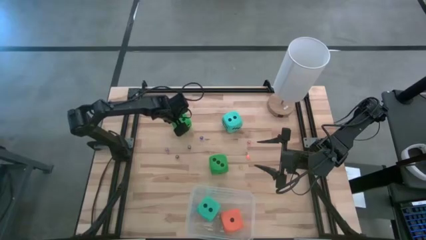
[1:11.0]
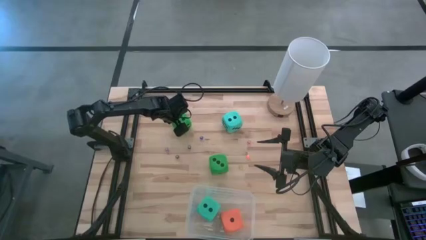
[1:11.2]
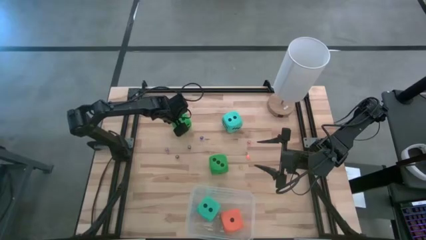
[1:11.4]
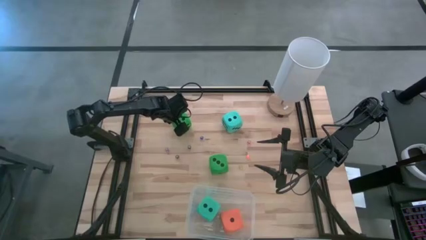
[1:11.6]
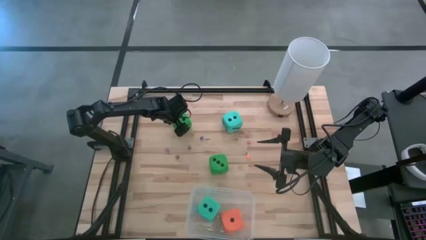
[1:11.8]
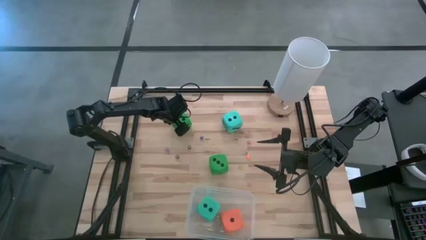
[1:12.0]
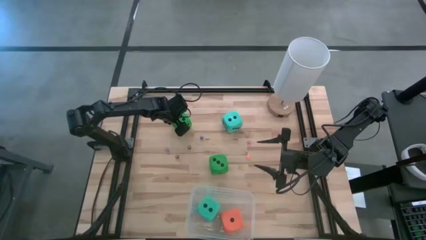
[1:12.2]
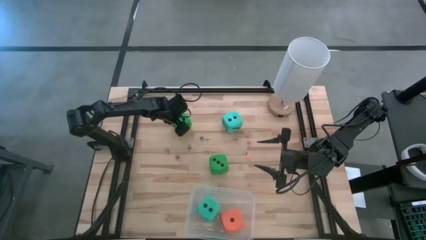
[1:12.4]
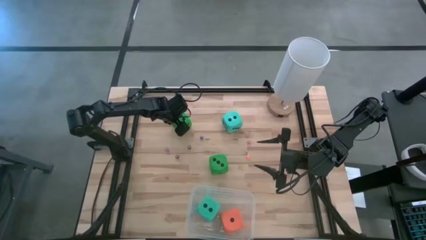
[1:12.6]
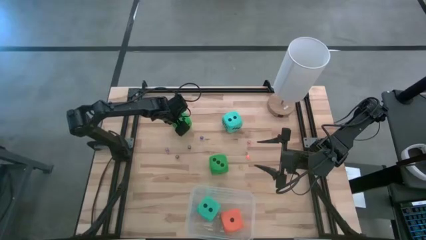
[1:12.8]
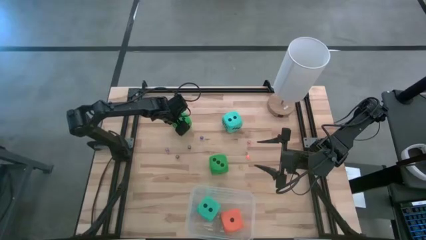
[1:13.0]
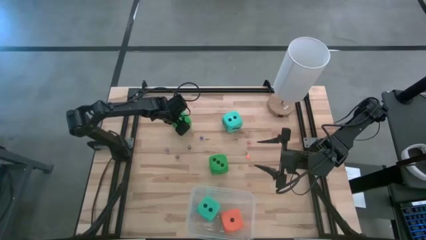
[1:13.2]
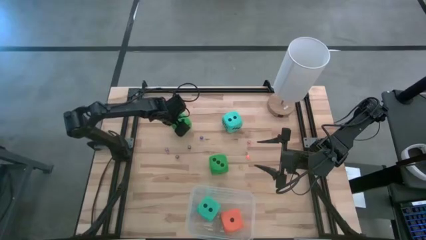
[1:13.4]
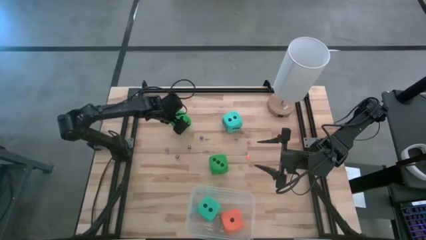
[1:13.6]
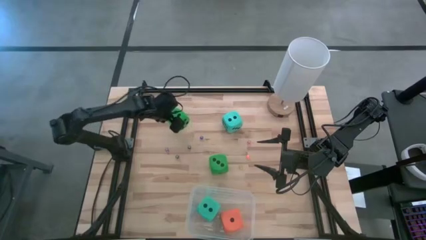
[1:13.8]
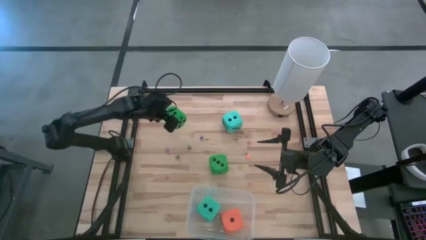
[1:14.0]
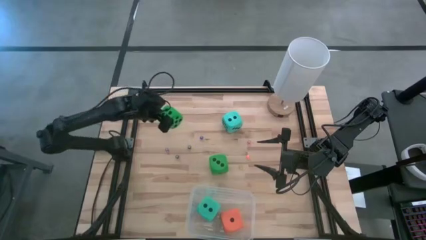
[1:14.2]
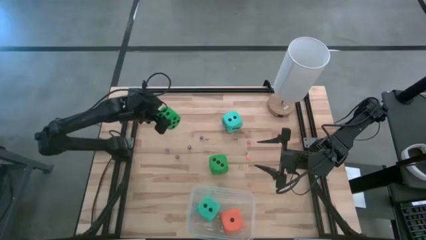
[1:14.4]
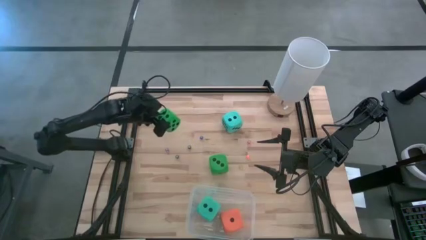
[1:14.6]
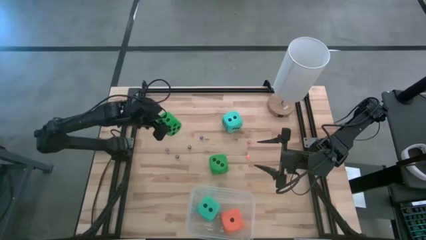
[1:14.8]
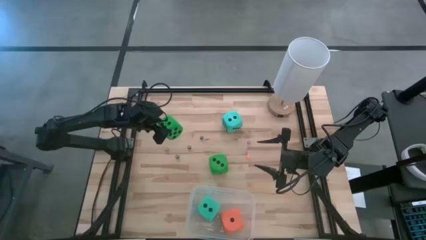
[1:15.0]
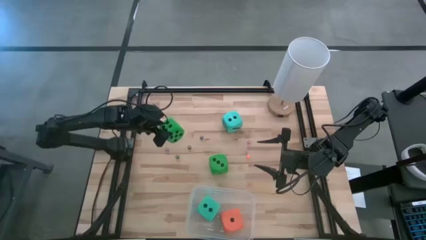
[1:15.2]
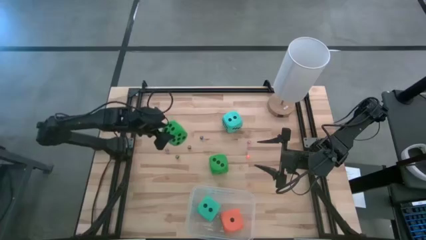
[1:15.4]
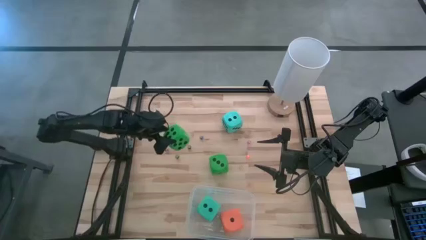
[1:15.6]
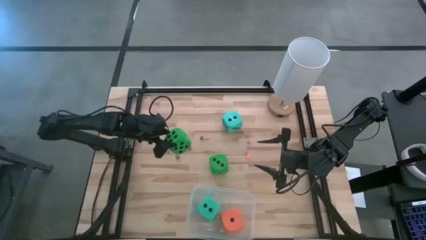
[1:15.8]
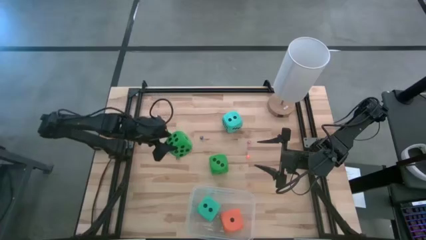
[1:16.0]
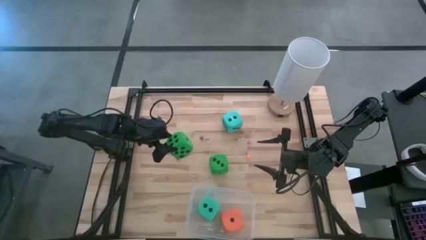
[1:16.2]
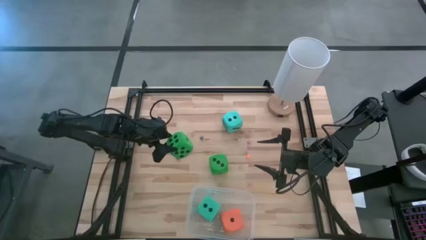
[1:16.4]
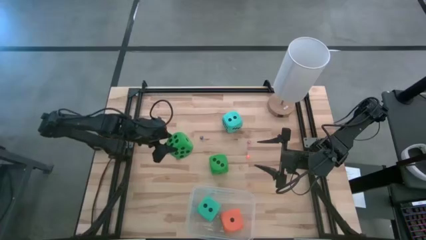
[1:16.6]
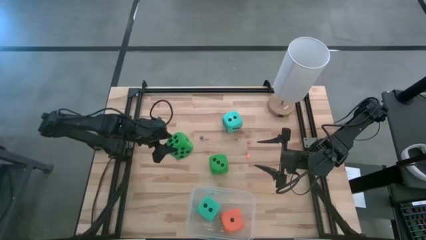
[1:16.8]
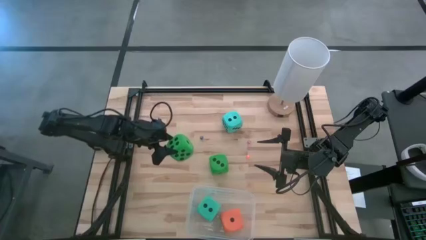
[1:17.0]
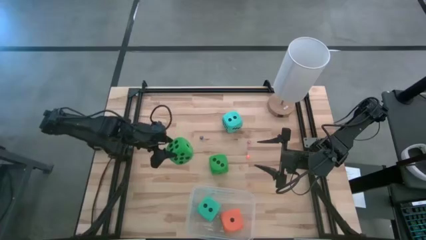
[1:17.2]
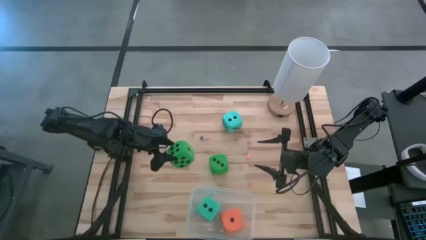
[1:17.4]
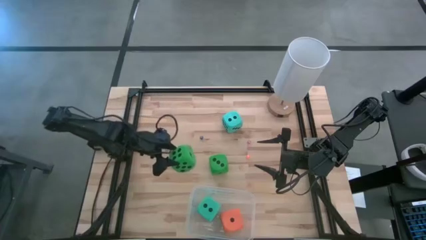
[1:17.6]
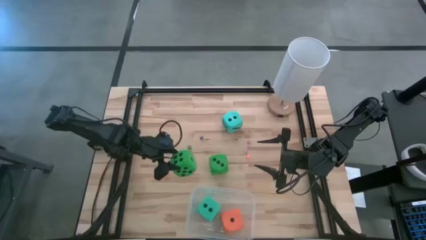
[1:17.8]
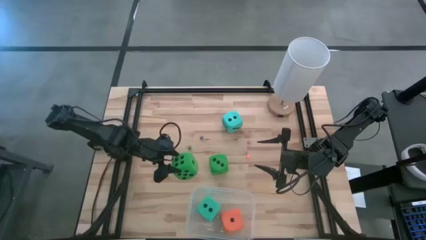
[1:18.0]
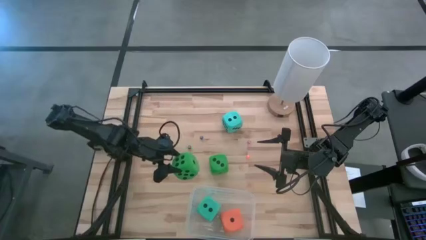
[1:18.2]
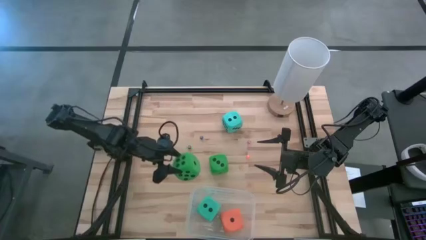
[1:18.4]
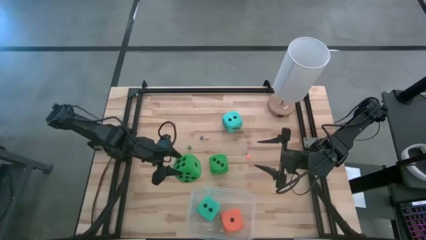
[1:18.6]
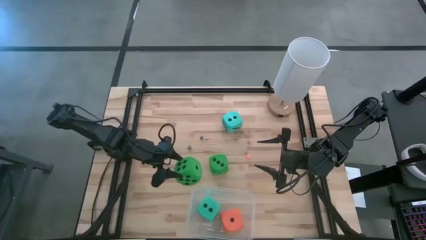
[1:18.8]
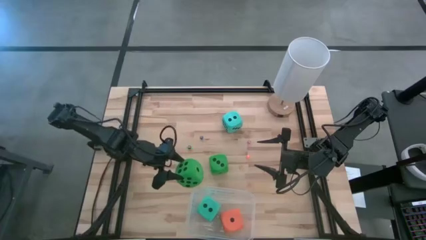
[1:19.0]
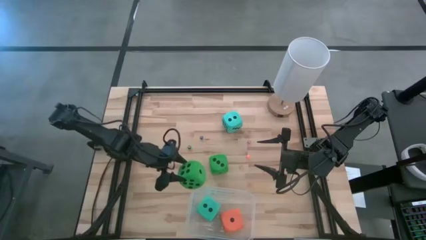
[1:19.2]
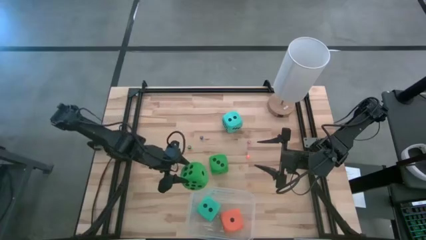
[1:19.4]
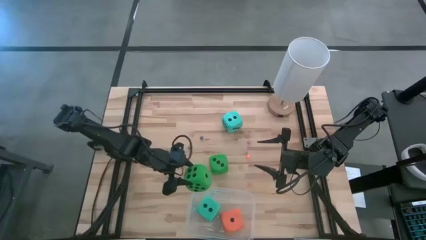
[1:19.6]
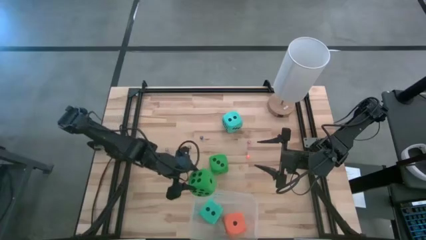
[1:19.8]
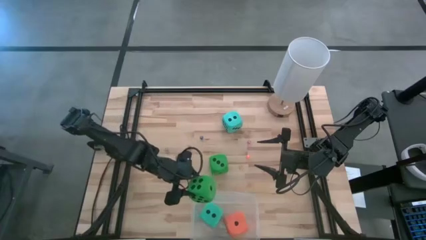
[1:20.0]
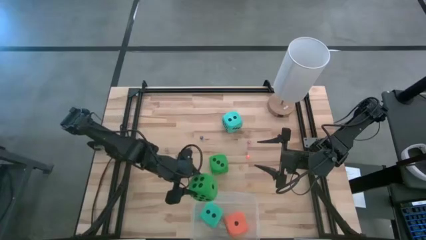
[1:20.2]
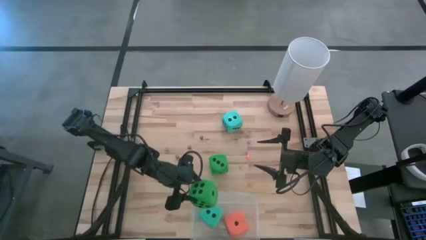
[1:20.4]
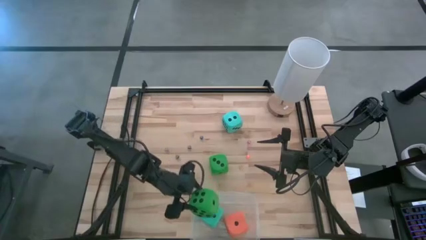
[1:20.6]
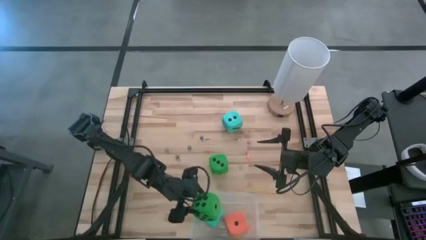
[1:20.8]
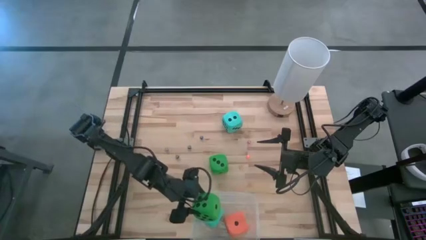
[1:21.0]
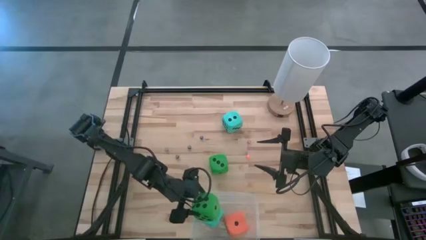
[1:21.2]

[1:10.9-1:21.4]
Task: Pick & Place Dice
Put the top large green dice into the transparent bin

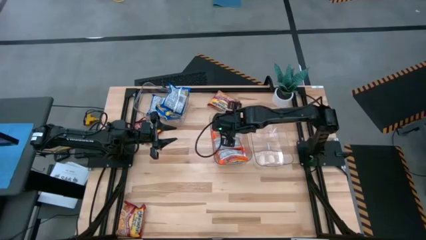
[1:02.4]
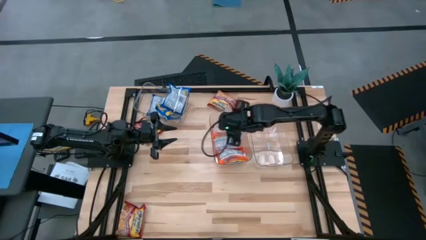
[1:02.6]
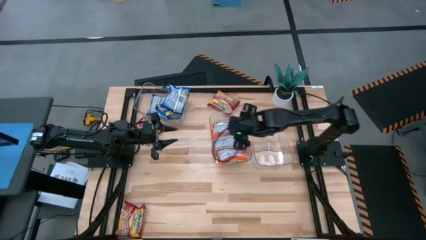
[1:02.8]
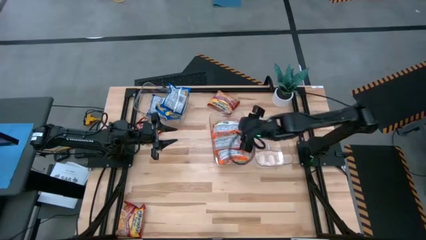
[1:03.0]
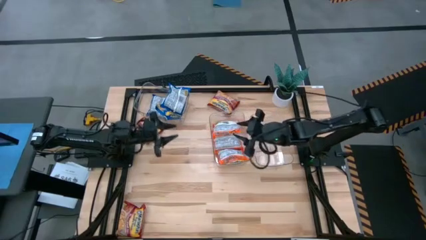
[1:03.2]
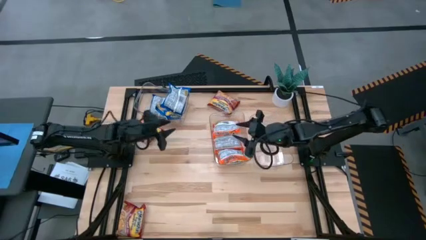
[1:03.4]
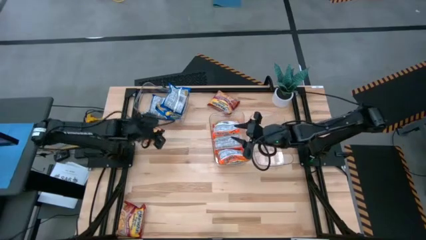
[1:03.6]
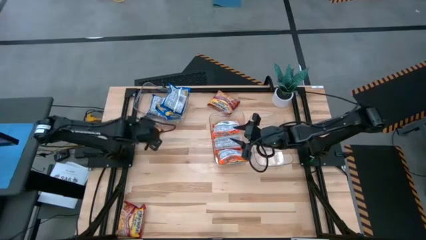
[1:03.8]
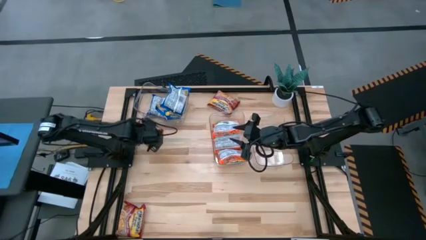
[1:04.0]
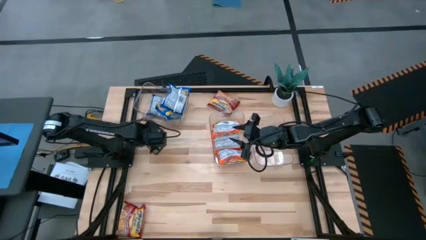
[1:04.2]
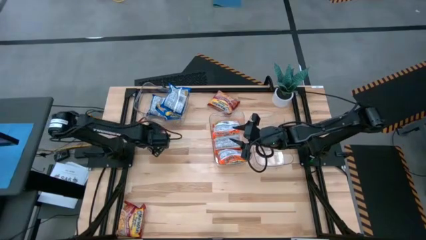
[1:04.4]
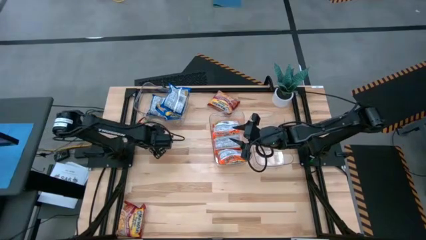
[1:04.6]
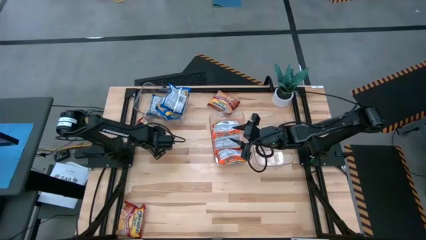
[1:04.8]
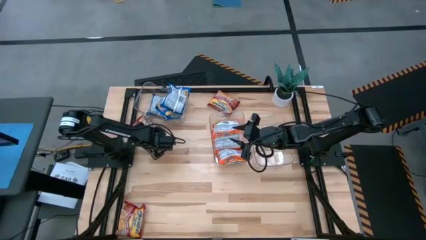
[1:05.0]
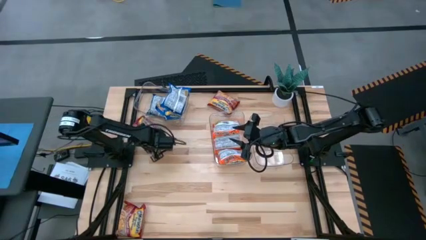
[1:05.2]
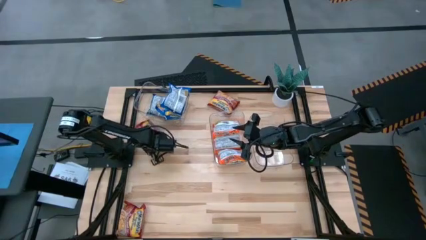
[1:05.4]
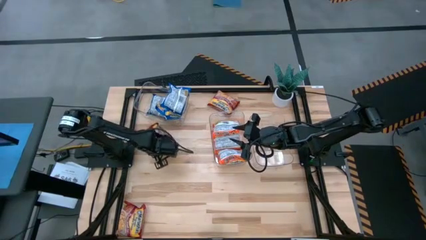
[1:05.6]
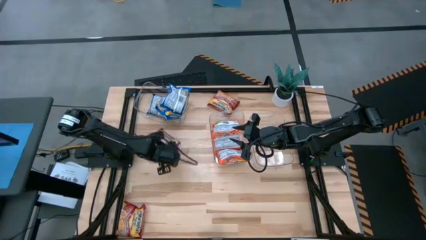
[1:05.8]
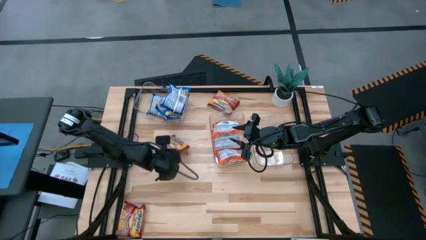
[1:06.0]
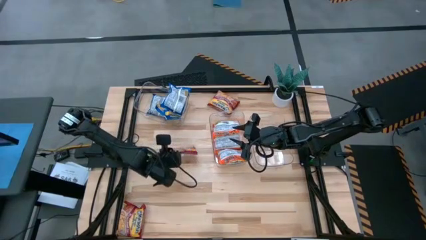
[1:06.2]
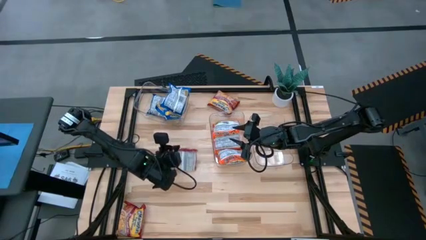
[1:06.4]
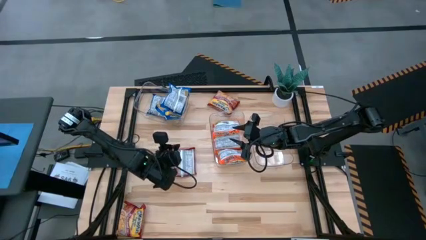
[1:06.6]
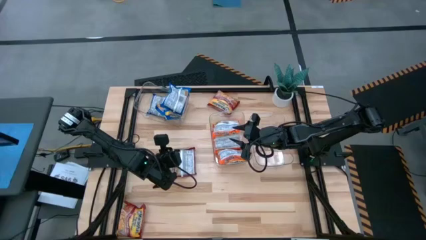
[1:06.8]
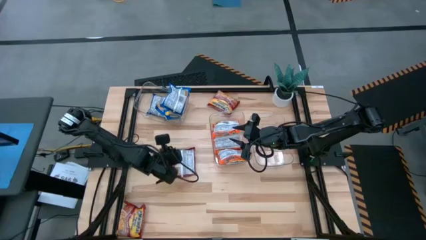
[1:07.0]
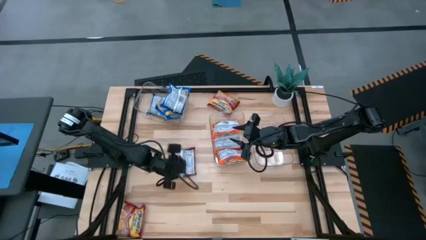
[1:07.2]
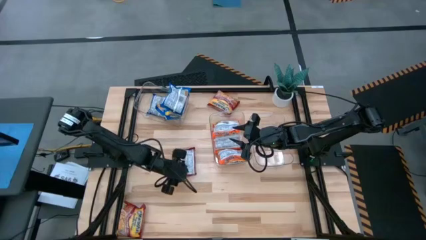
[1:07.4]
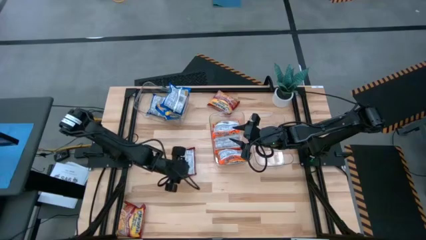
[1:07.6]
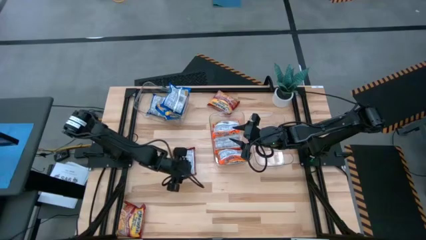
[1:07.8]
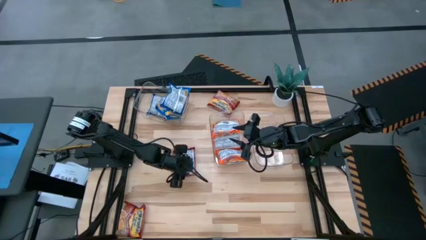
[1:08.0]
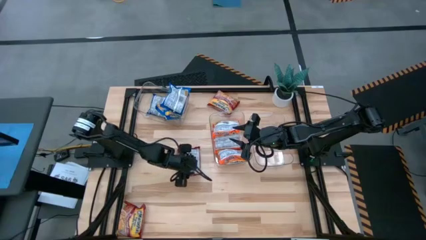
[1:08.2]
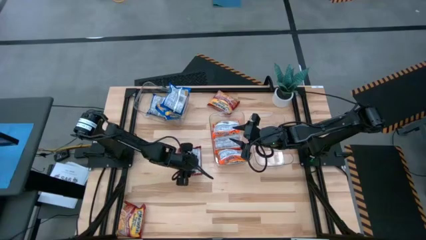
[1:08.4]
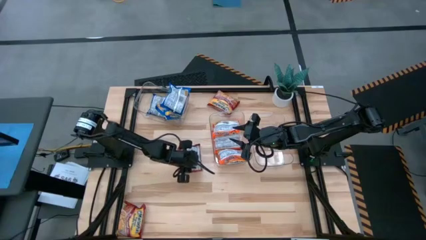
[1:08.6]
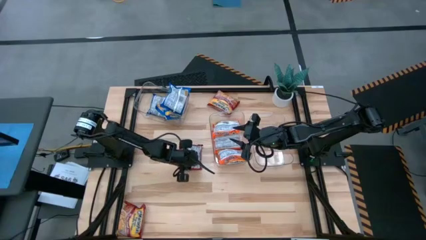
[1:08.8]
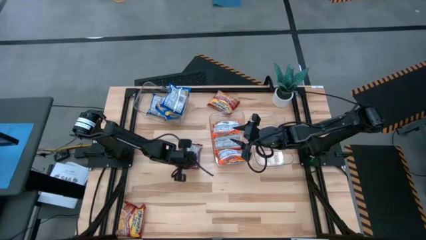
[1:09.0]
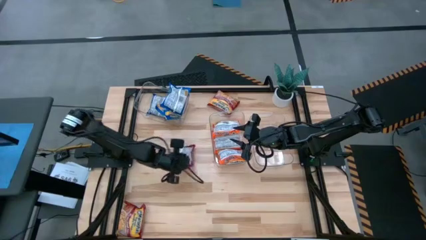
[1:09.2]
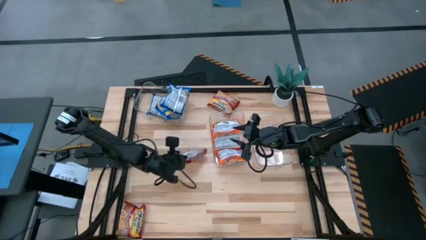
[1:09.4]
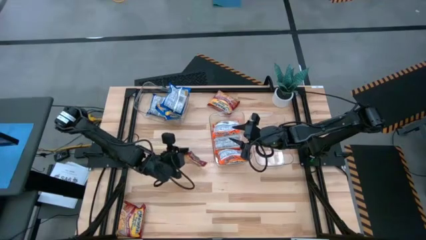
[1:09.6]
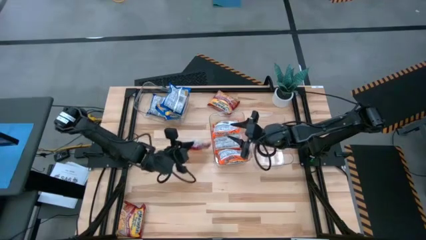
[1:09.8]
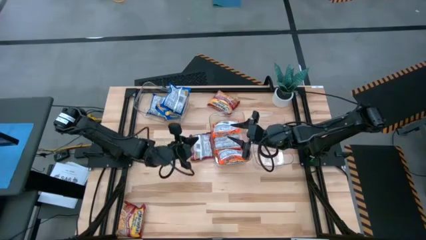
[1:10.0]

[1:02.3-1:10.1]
Task: Sort Maruchan noodles
Put the middle left red noodle pack into the bottom right transparent bin
